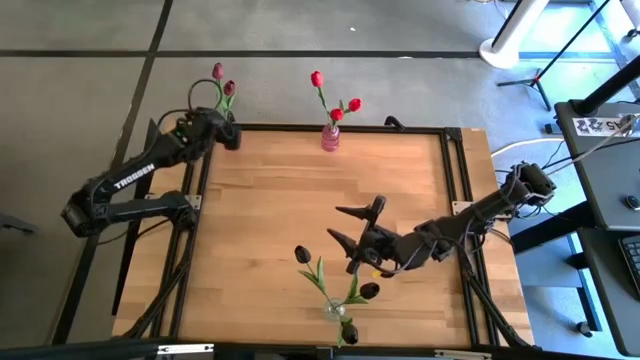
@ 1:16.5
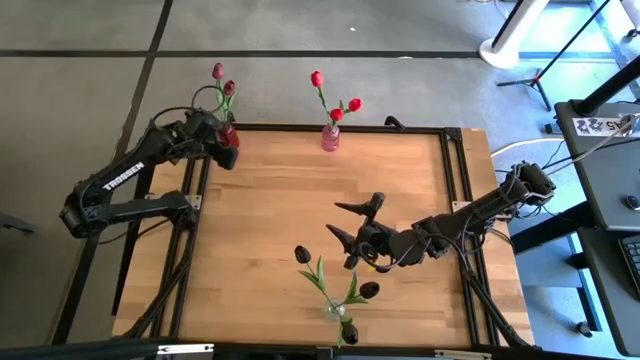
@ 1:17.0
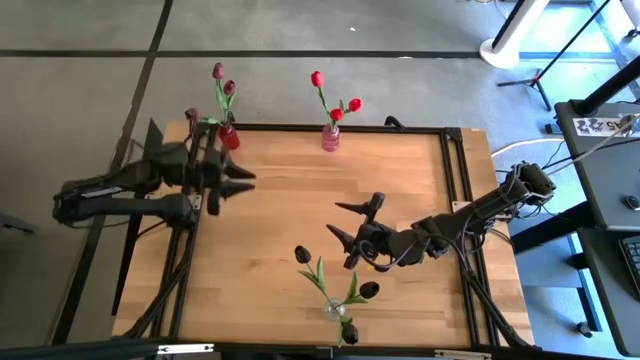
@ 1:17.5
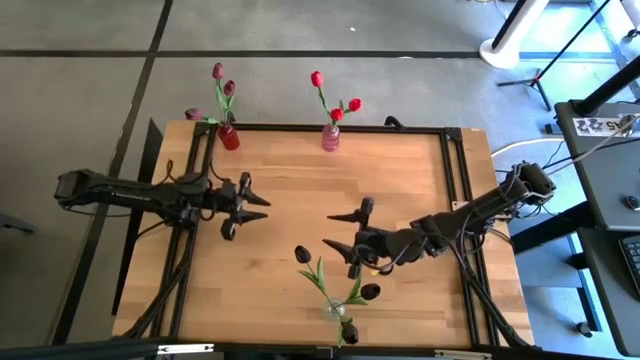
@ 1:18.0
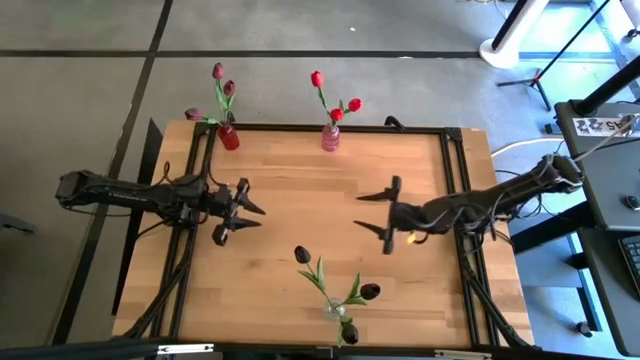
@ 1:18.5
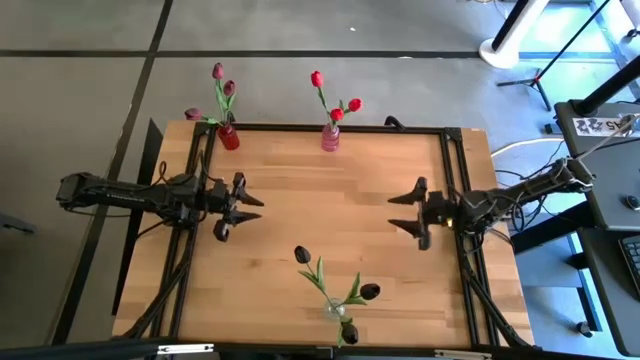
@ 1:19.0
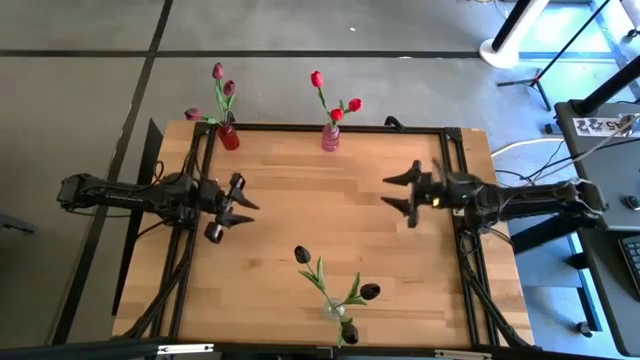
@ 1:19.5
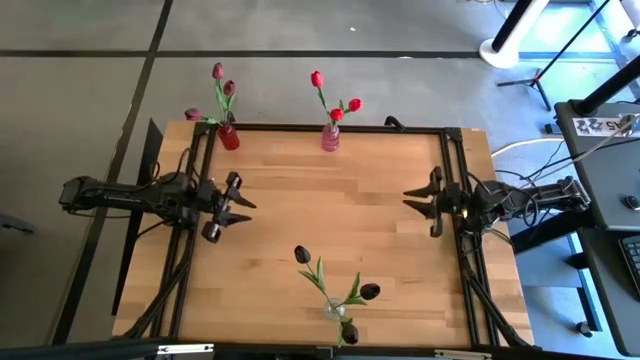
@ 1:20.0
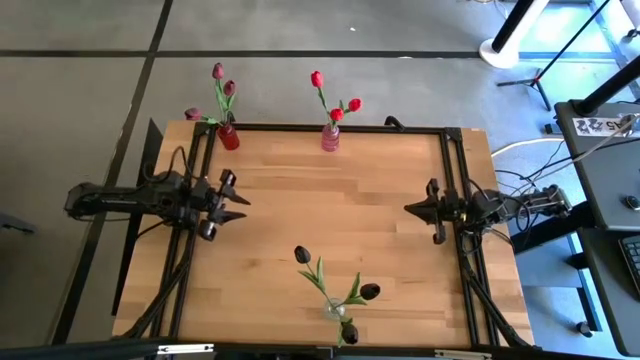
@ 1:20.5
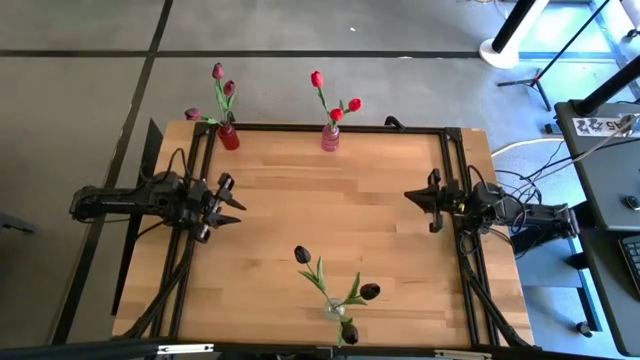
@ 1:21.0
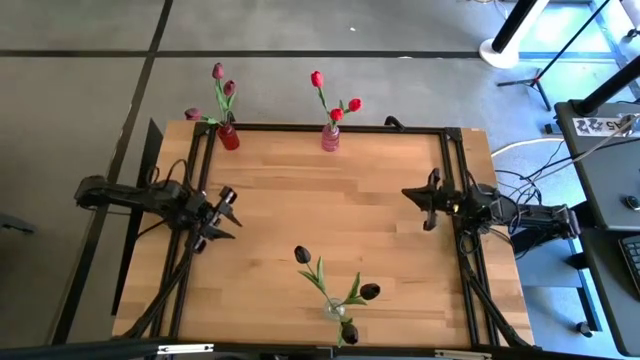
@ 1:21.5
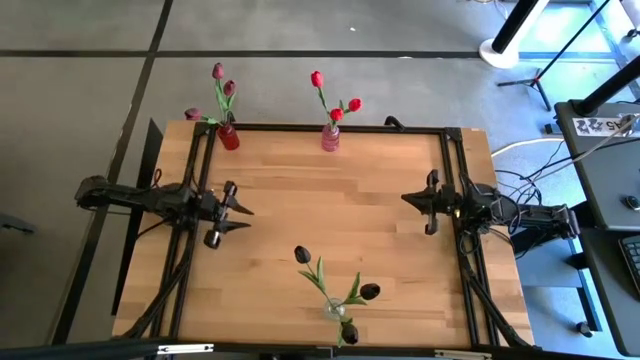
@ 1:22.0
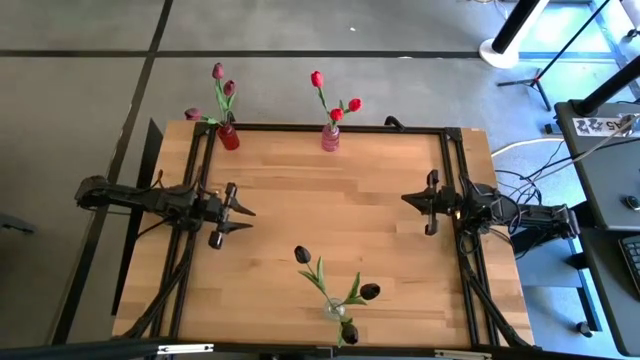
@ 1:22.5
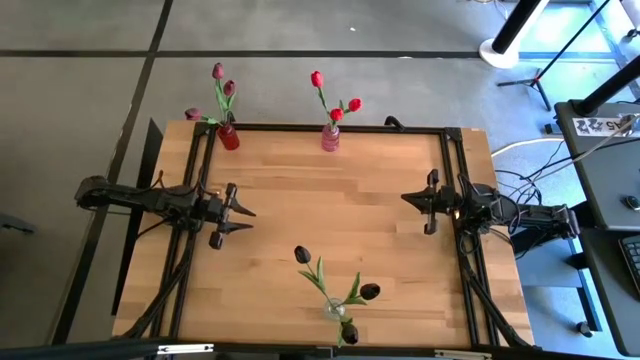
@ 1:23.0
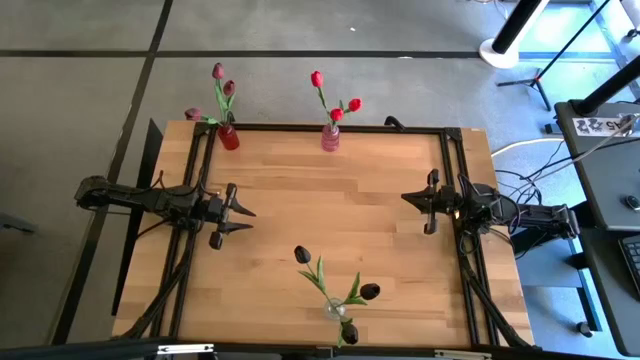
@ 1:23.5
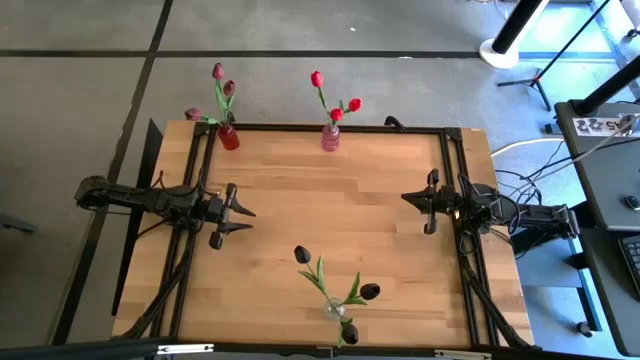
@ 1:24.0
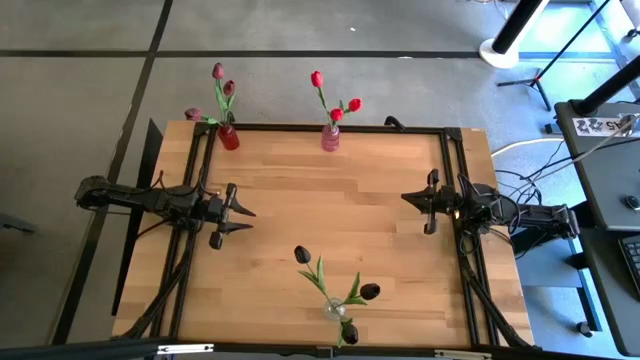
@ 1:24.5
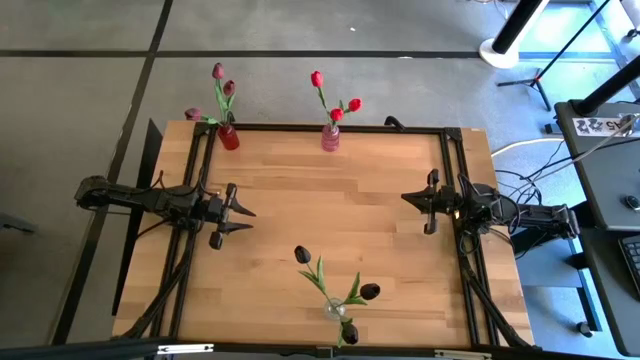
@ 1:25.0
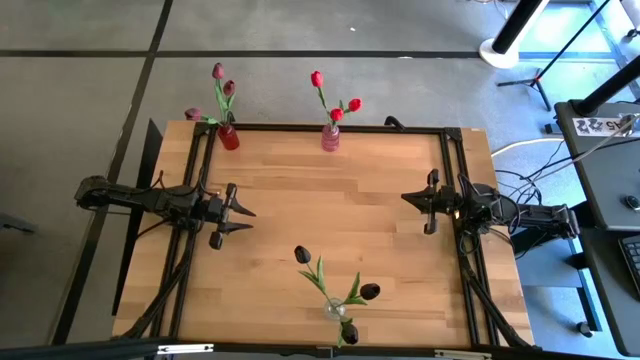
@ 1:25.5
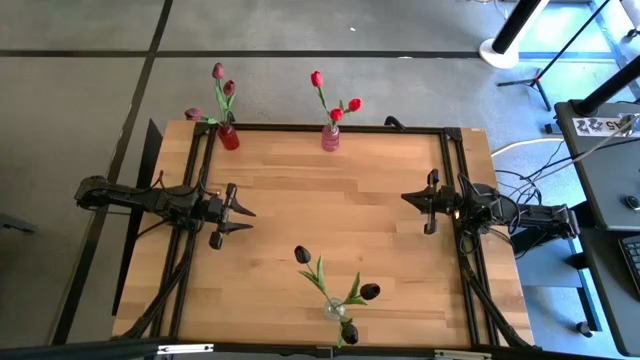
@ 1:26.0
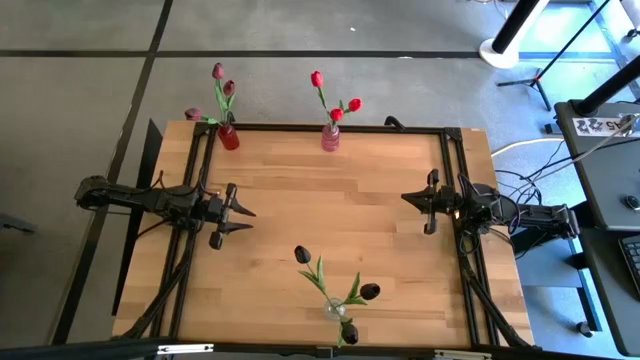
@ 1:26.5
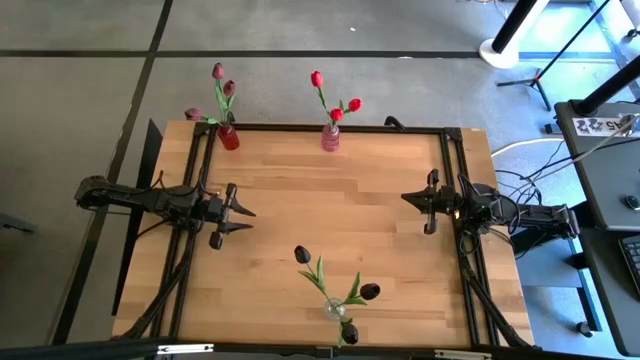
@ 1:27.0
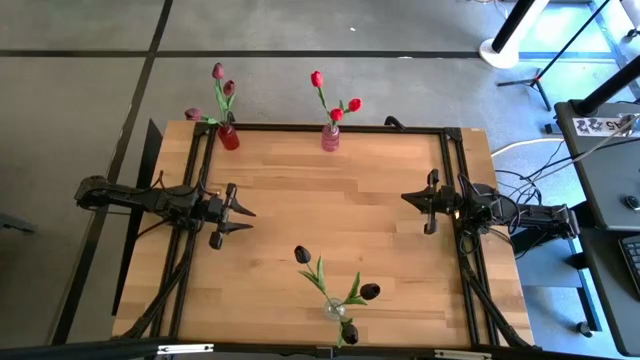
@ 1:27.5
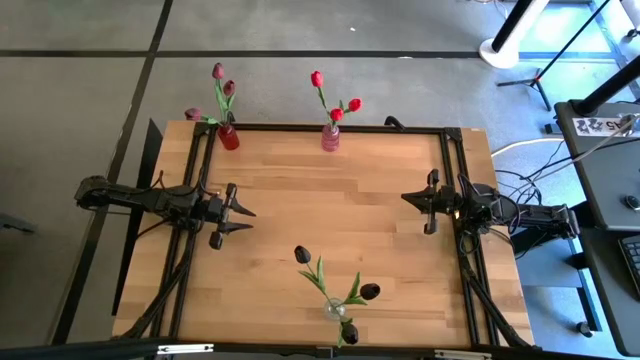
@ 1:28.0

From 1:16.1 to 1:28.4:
Task: Sort flowers into vase by color
Return to Home Position

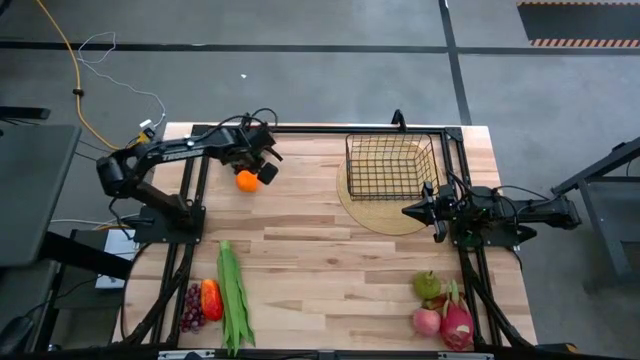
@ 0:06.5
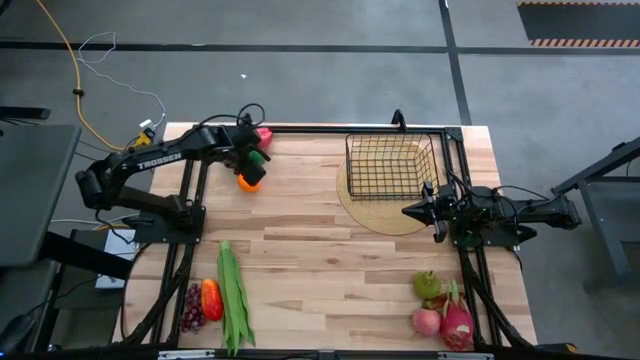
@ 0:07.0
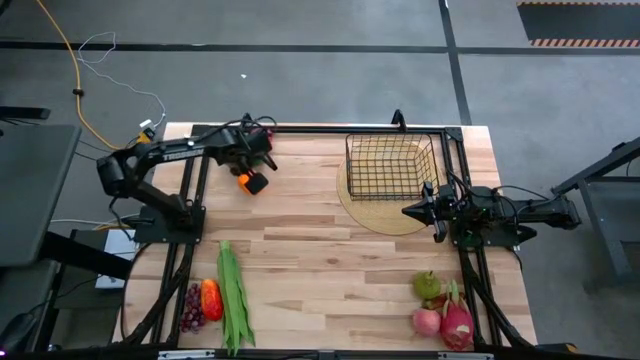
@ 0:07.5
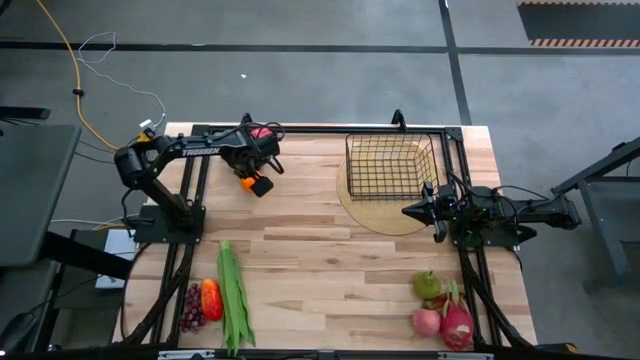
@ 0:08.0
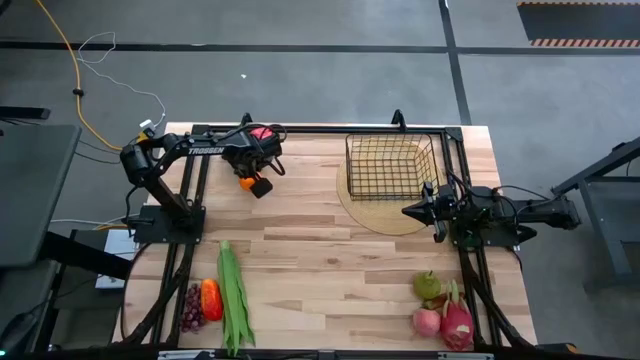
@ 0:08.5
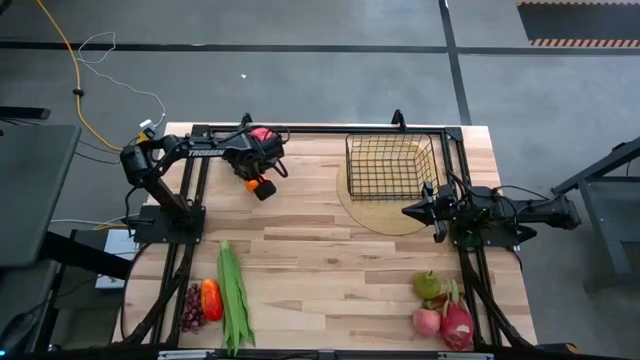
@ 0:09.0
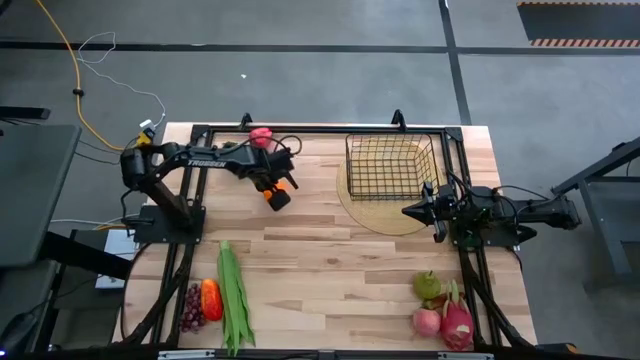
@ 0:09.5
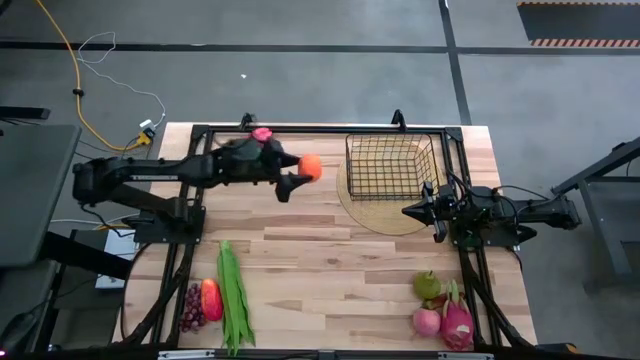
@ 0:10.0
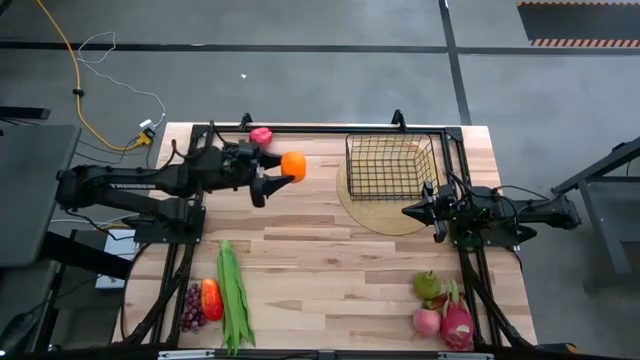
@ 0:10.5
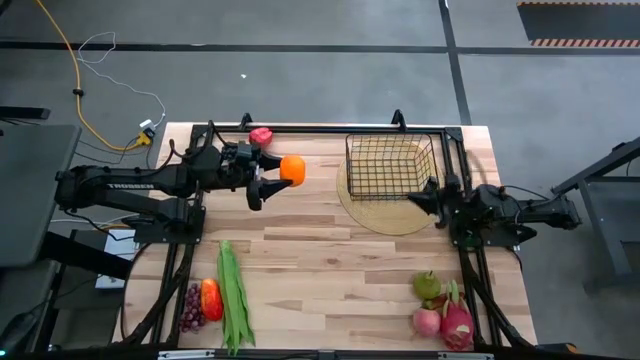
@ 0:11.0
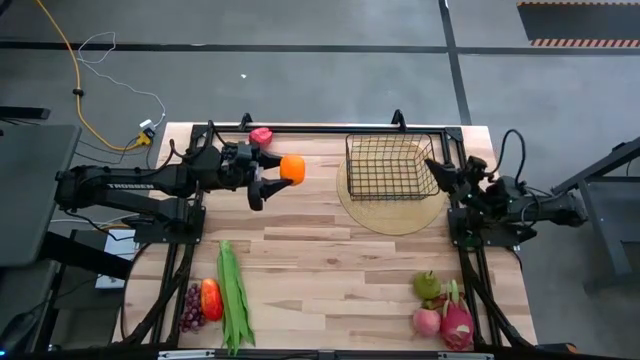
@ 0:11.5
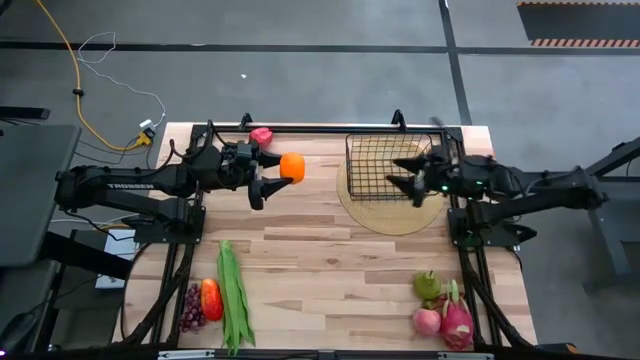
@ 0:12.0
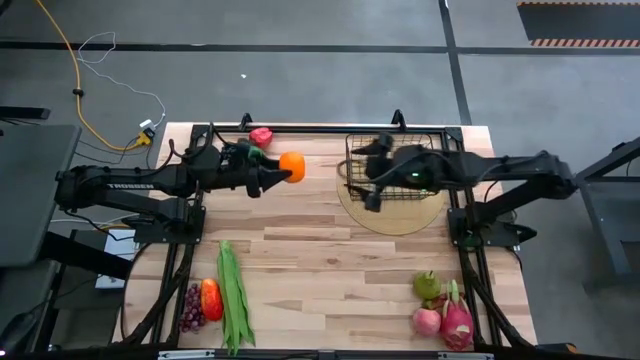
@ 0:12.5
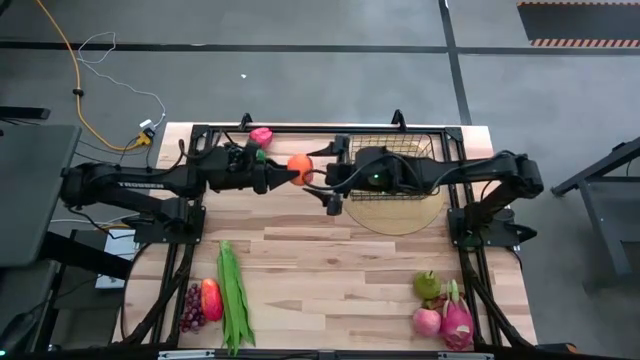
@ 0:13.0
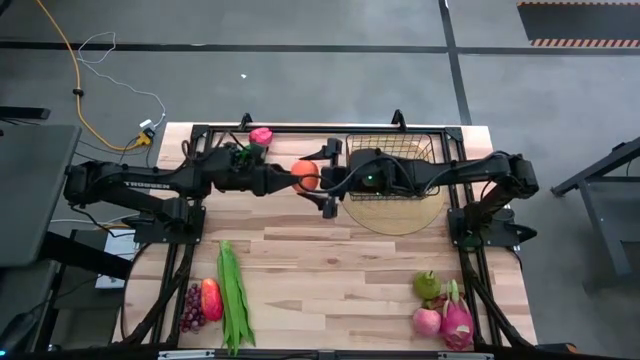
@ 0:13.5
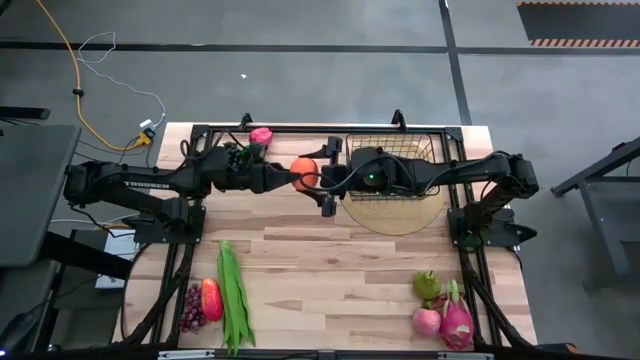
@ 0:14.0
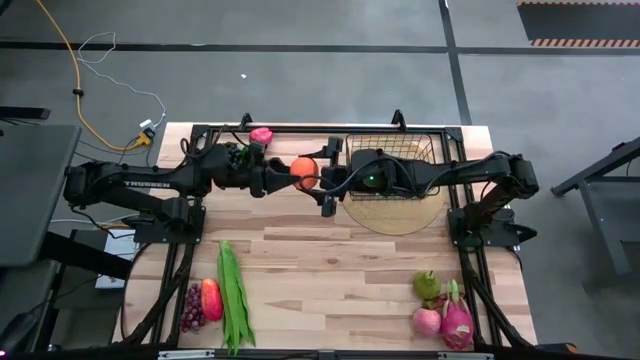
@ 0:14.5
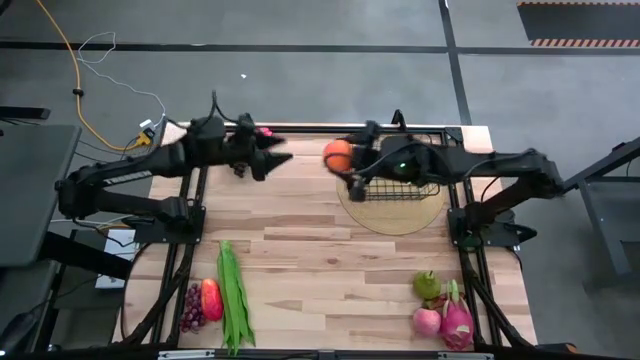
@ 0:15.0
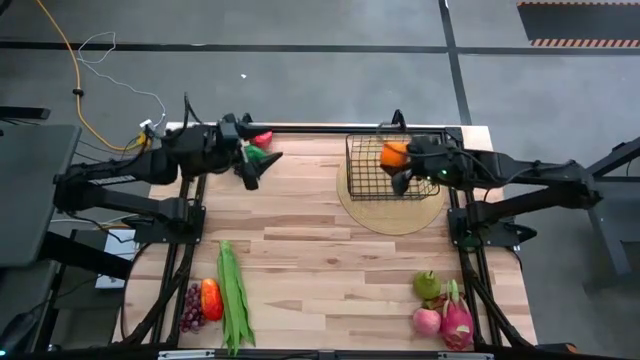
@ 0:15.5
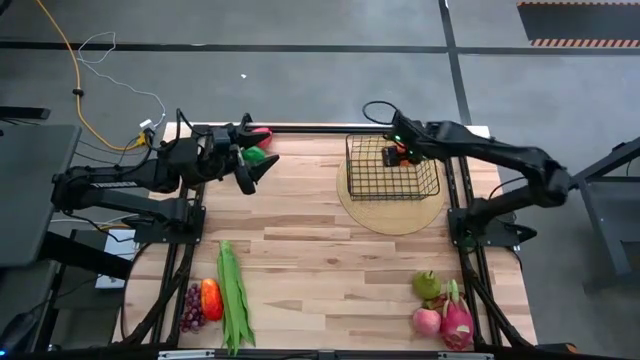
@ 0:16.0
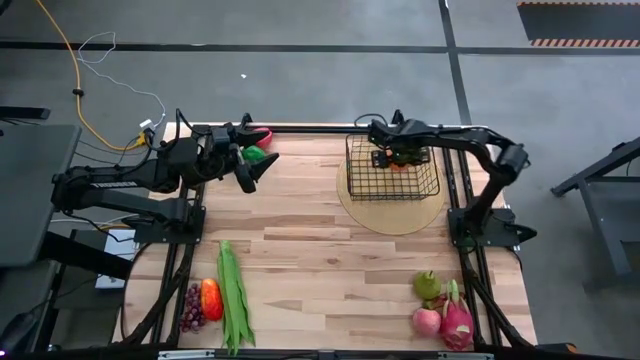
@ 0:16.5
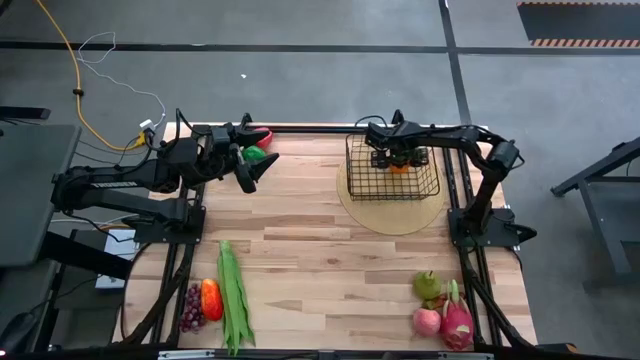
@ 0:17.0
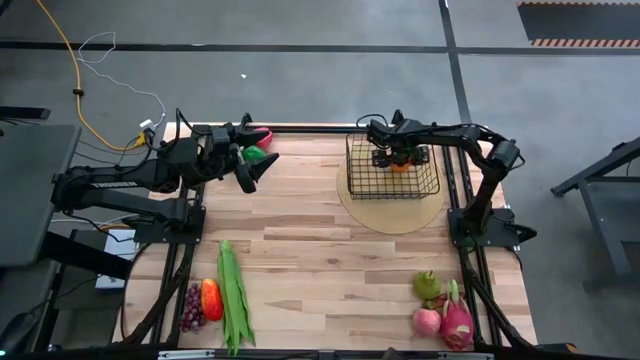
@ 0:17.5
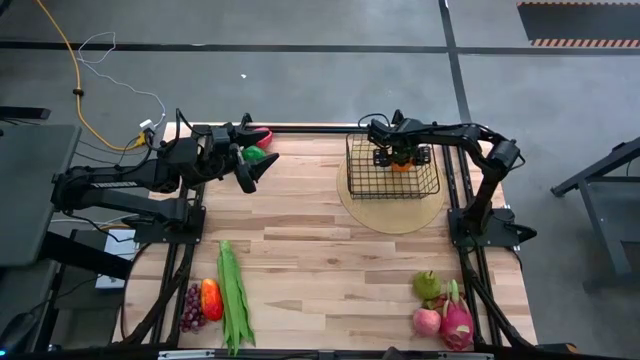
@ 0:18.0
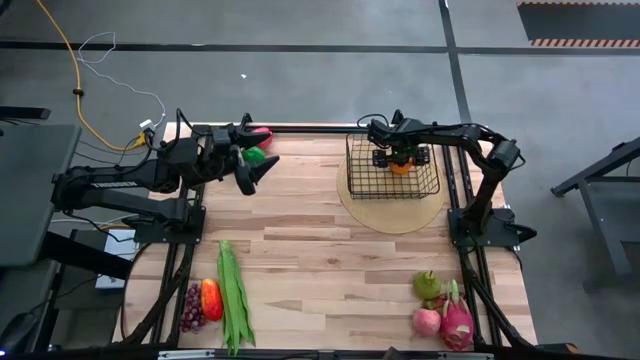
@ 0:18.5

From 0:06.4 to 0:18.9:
Task: Build produce basket
Put the orange into the black wire basket
